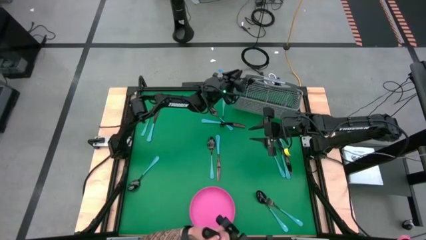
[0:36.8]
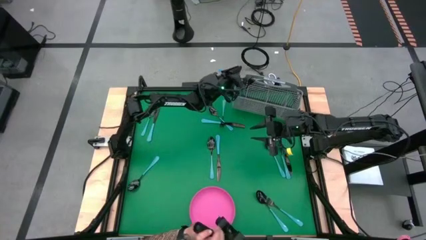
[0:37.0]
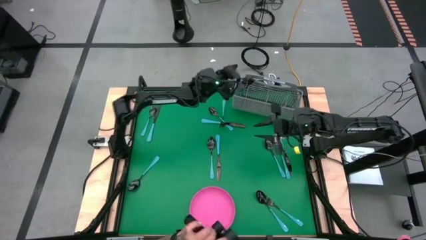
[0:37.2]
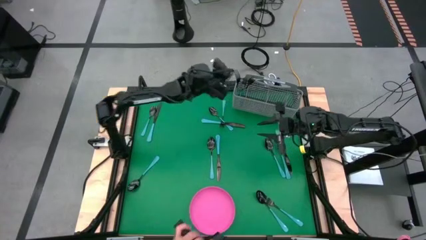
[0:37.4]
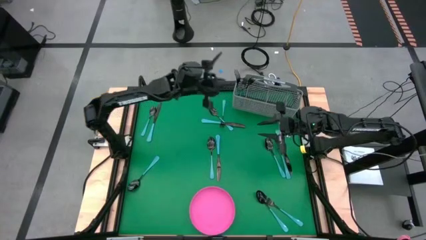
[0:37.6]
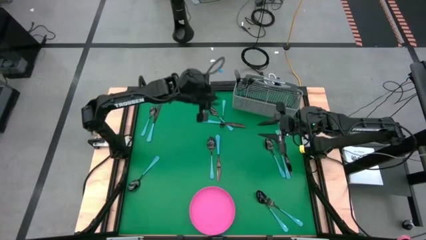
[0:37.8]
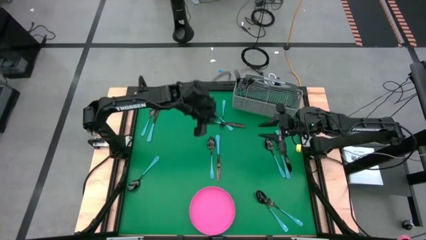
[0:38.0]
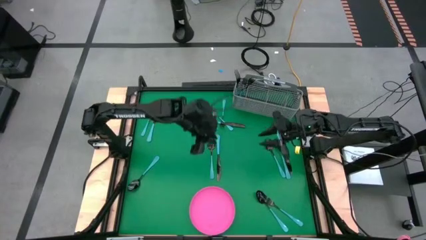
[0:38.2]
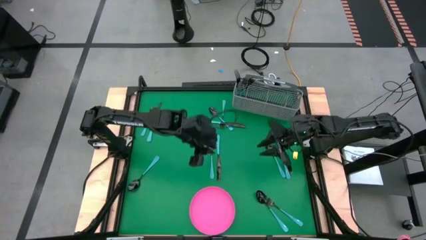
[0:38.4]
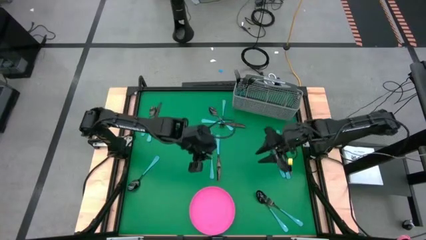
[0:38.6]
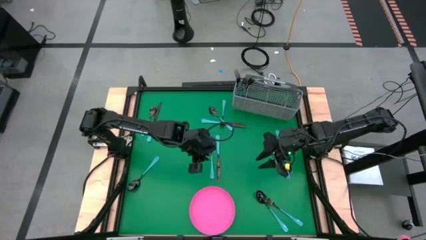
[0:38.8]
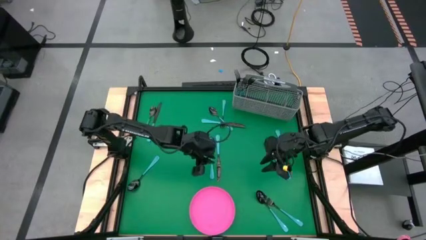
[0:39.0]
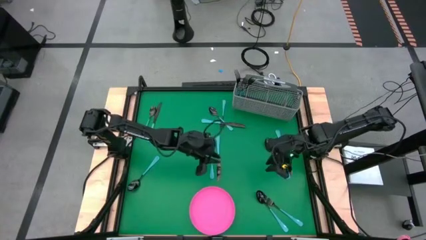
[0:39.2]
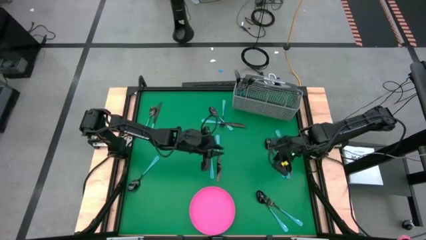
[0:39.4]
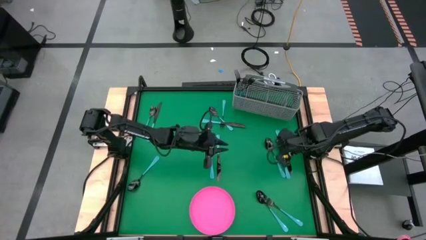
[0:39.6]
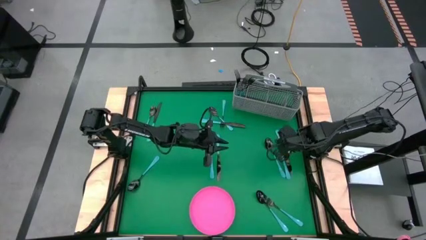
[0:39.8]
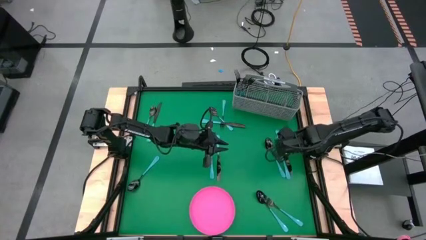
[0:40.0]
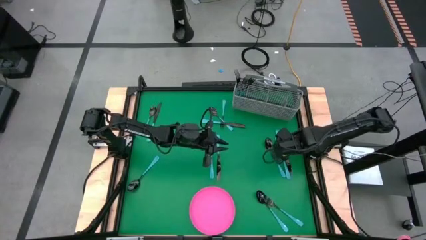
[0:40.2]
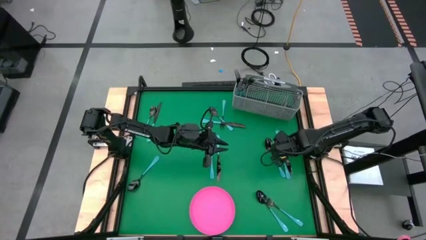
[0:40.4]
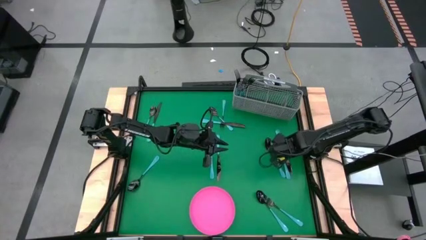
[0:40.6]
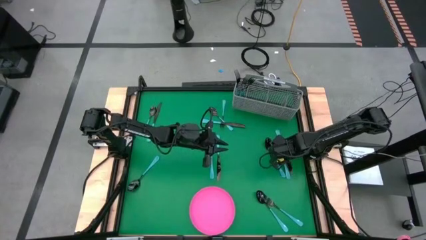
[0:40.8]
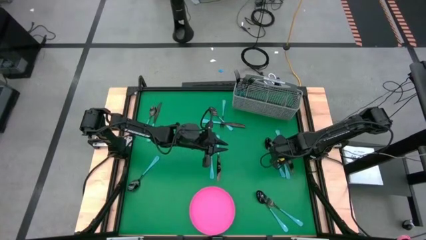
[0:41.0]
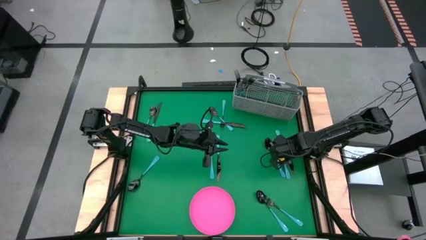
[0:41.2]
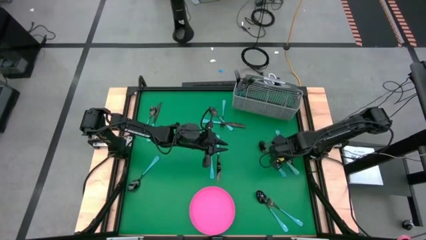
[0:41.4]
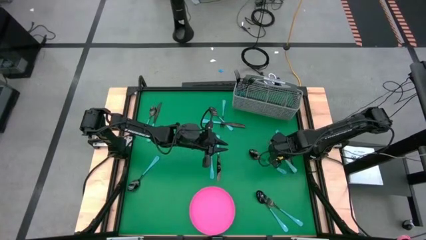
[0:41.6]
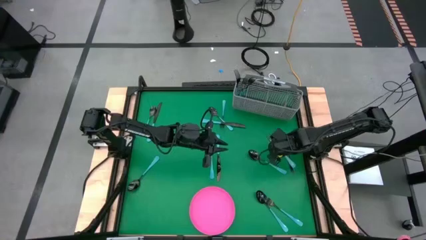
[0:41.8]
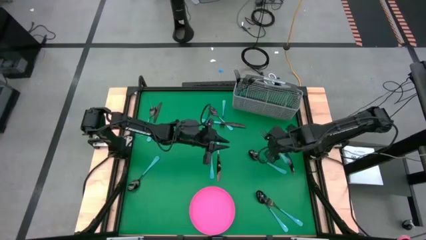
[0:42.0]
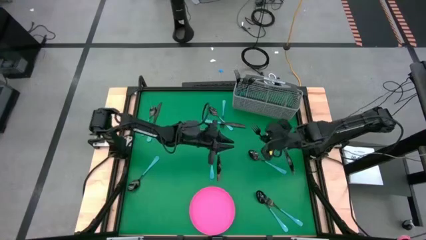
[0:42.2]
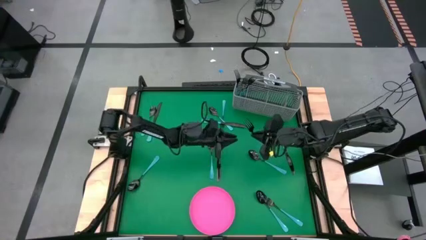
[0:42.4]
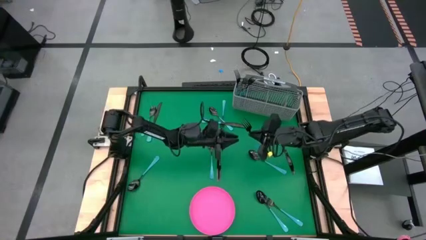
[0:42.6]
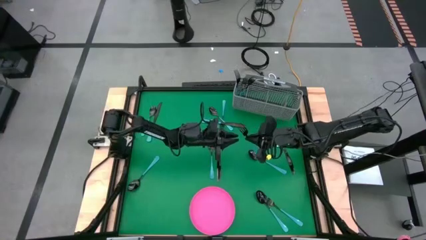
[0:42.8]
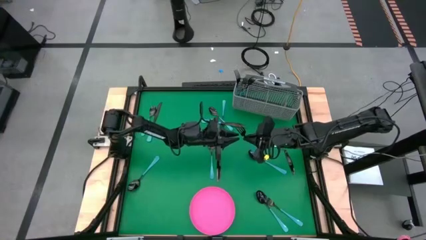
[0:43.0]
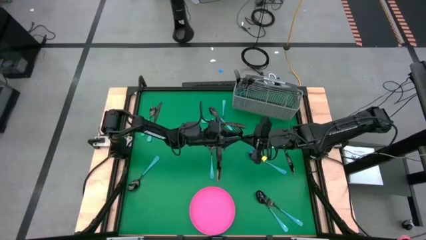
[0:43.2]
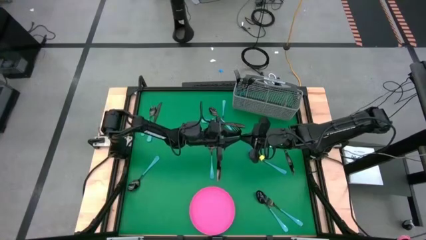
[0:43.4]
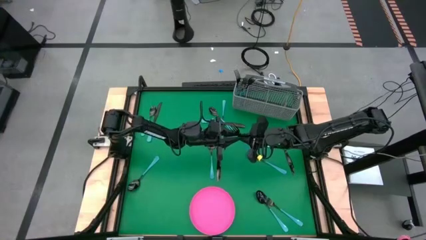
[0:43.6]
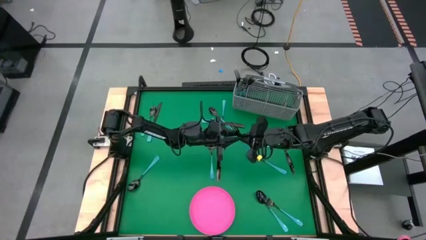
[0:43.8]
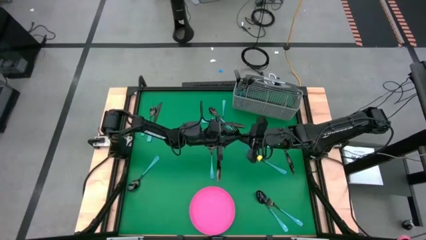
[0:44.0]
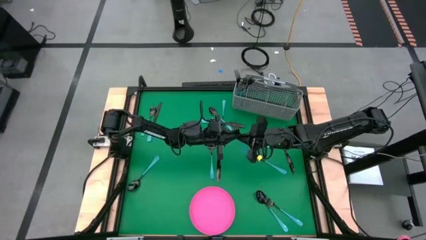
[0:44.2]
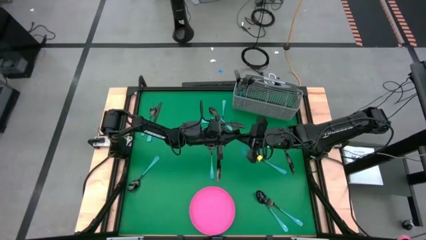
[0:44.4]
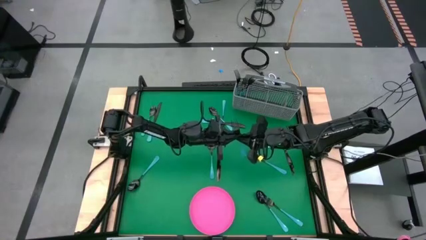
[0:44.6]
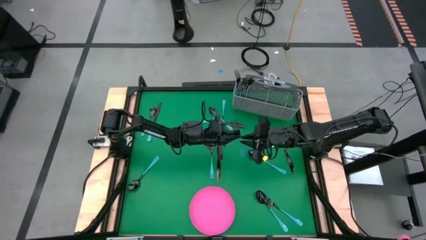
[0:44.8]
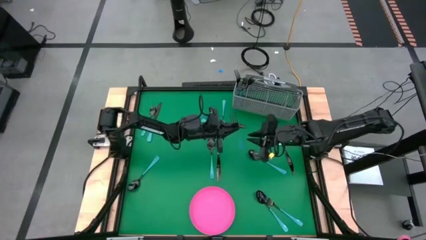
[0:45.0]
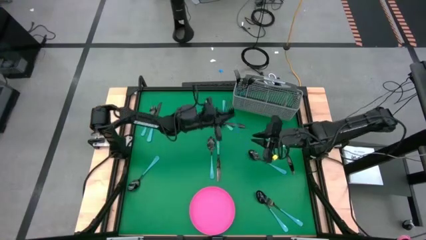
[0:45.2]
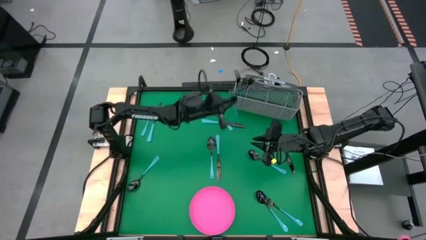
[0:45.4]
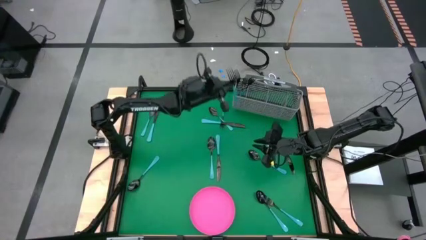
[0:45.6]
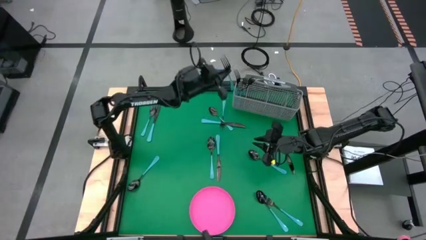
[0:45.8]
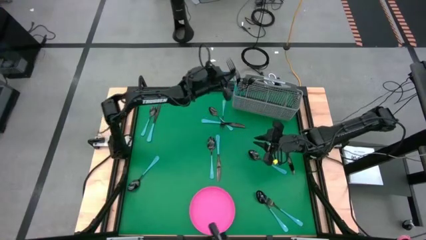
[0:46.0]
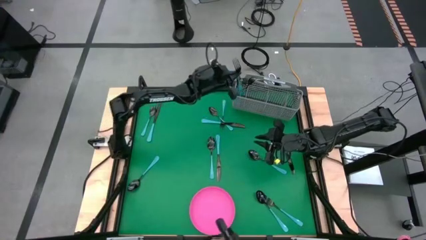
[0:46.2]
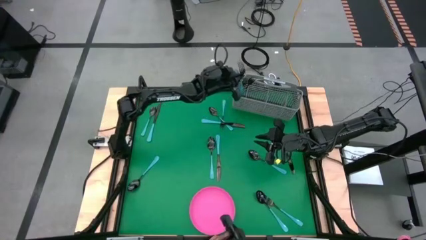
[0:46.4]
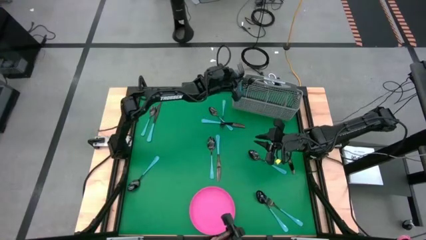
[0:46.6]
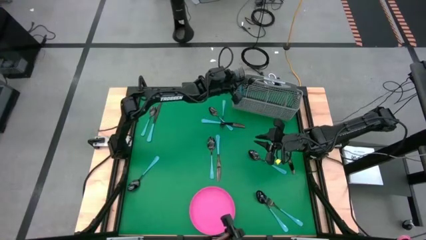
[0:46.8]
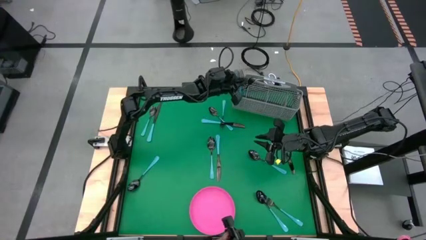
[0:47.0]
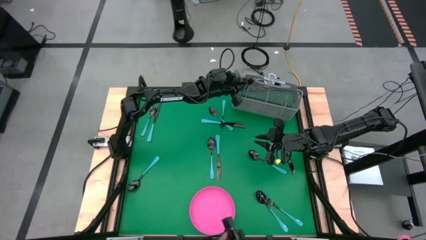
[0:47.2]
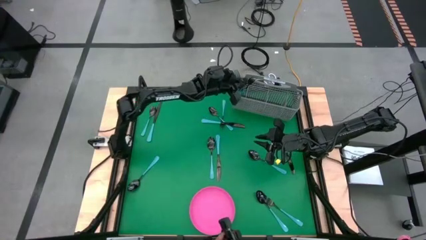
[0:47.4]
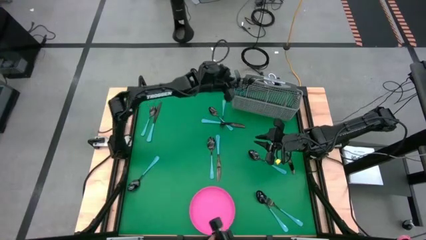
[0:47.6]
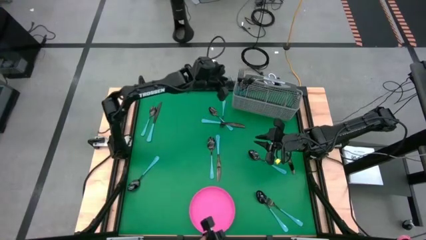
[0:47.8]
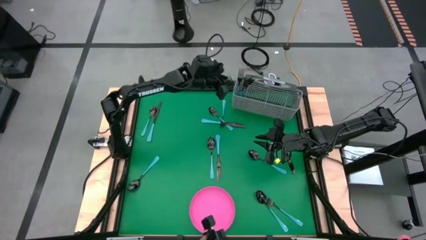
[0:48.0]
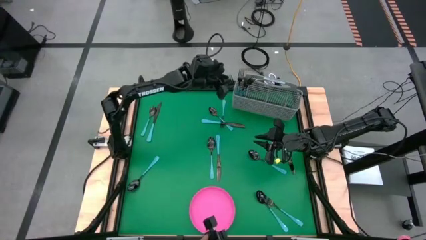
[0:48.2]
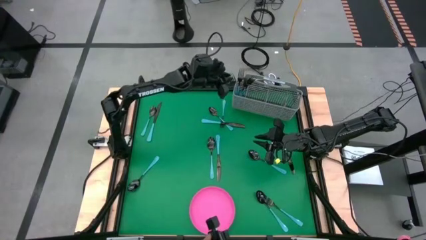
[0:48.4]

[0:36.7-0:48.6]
Task: Sort silverware
Put the blue fork into the utensil holder

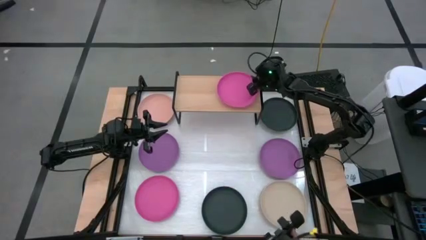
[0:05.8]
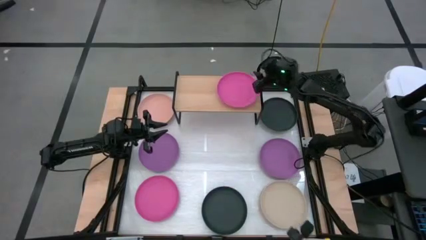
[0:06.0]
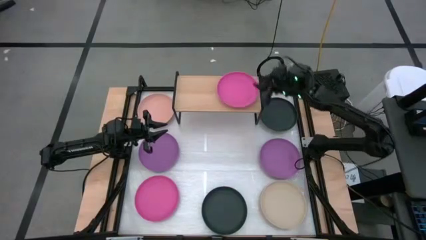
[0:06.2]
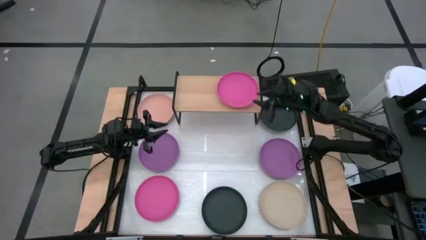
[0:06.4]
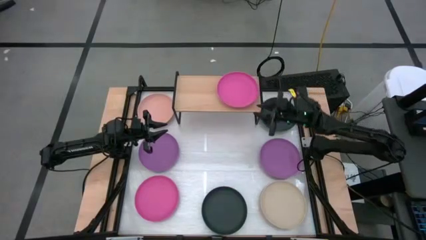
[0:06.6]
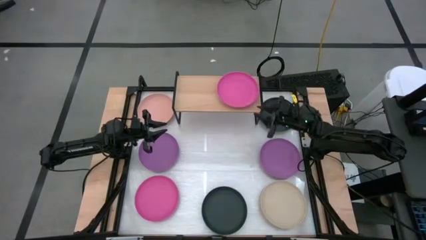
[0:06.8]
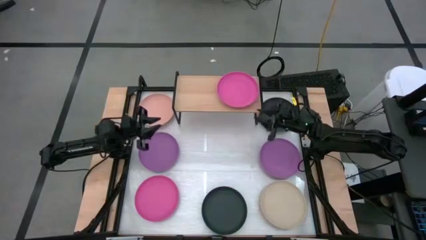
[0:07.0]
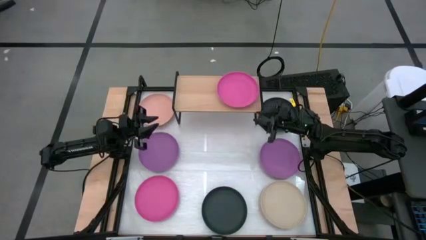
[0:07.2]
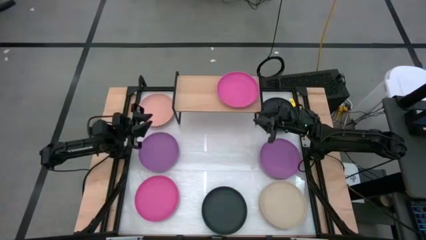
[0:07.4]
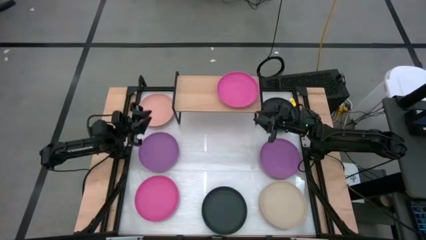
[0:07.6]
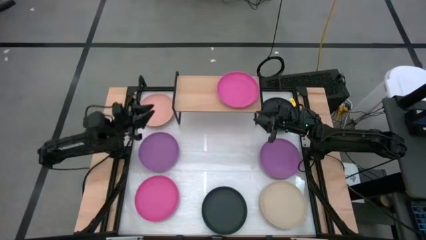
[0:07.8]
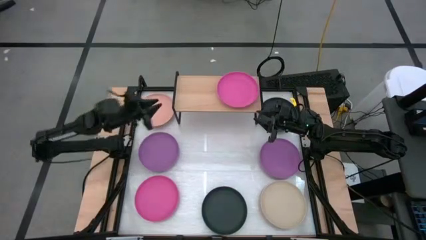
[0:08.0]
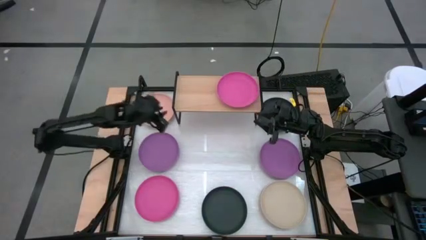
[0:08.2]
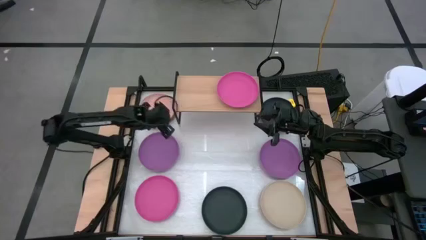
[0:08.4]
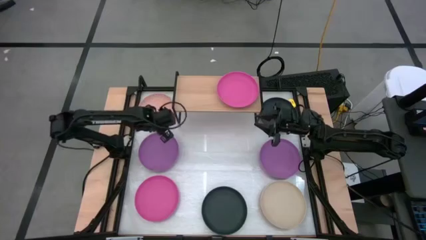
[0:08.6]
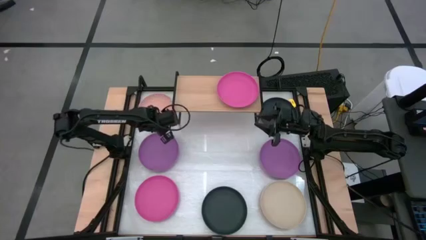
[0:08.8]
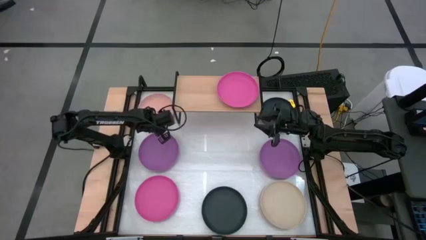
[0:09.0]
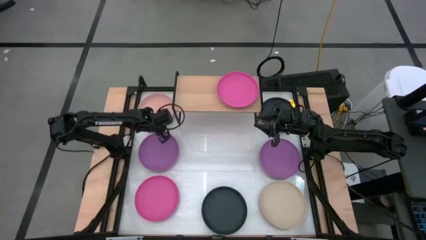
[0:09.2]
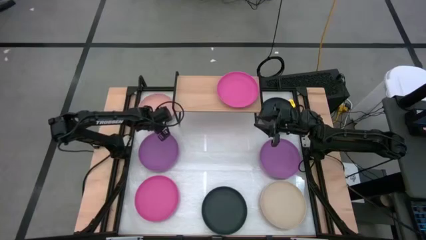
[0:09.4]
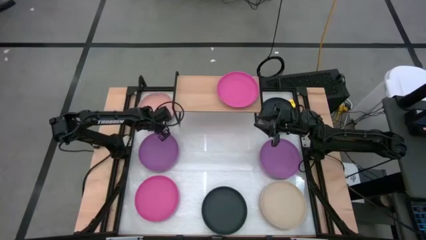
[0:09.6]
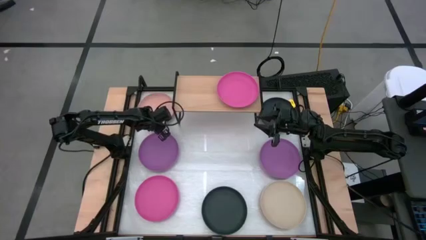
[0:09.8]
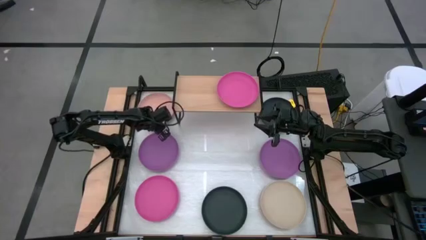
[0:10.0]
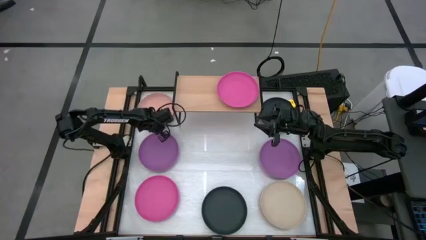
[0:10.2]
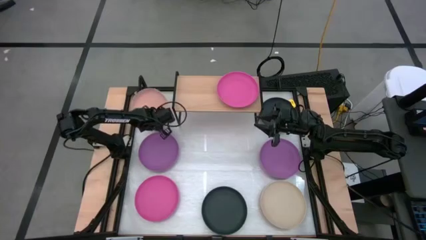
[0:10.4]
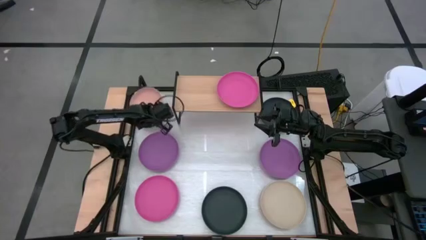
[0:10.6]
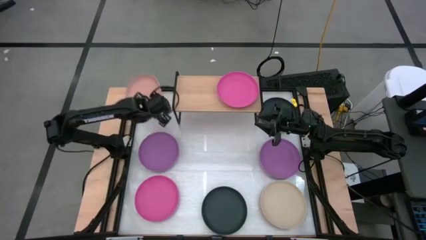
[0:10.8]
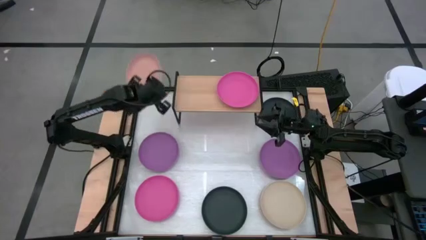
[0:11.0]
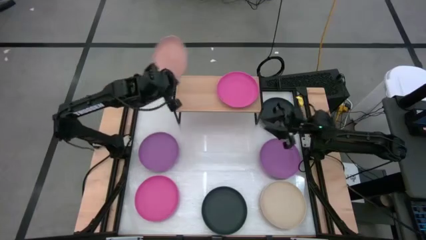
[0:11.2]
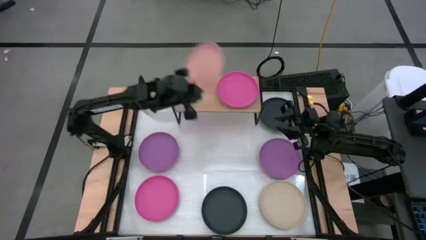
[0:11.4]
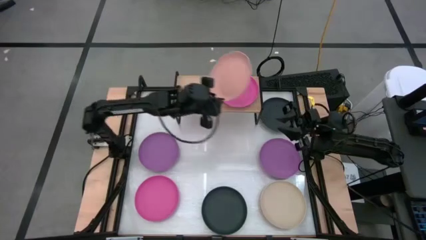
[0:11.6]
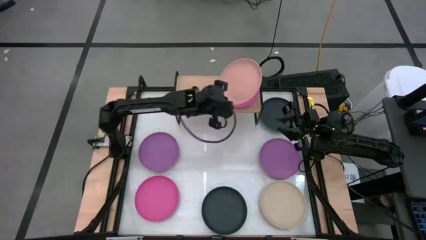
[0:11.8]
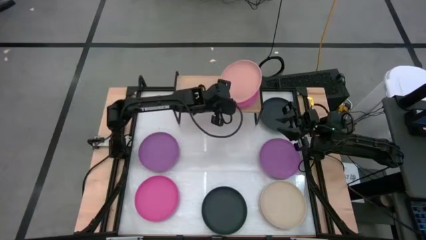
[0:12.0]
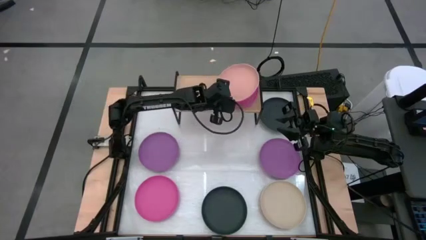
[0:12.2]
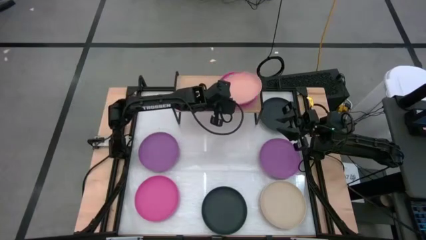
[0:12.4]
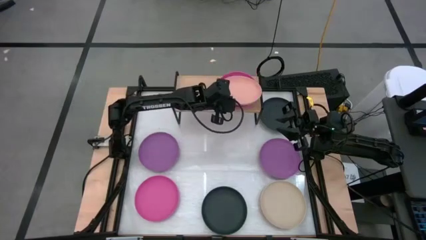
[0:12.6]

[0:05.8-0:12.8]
Task: Place and stack plates onto a shelf
Stack the light pink plate on top of the pink plate on the shelf
